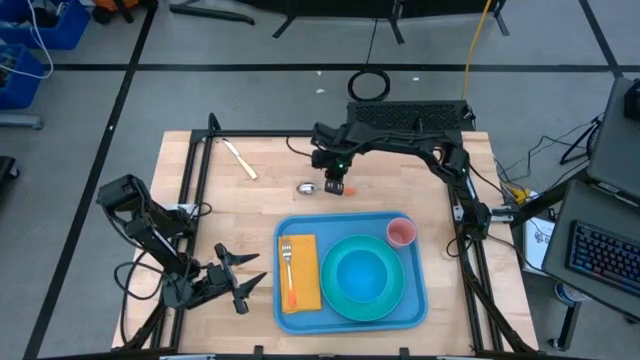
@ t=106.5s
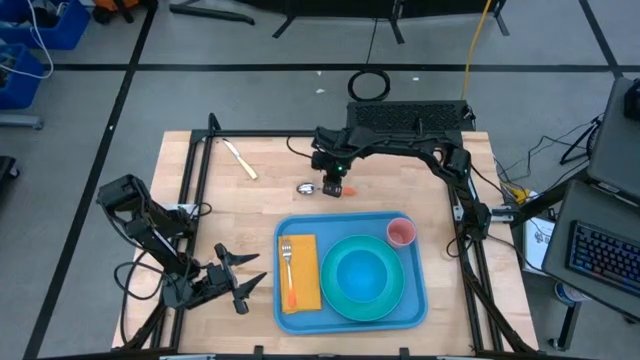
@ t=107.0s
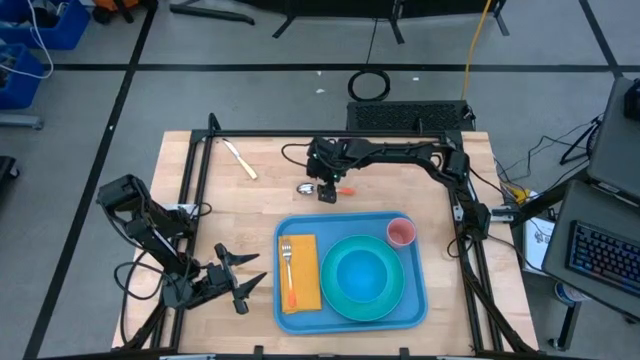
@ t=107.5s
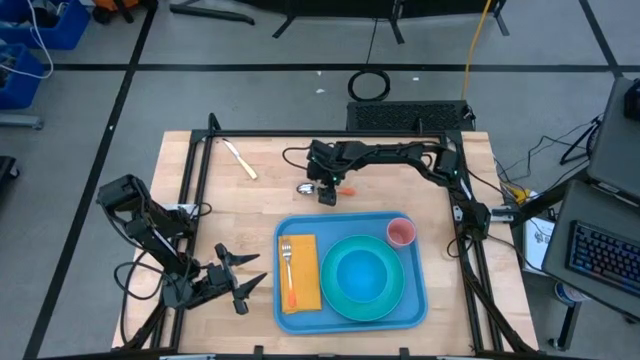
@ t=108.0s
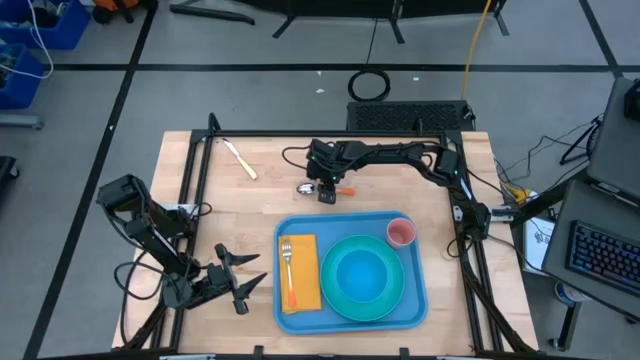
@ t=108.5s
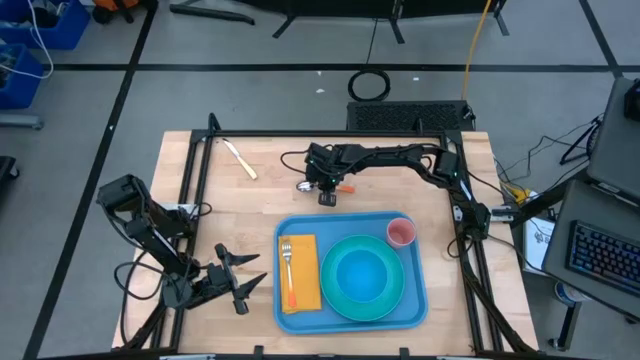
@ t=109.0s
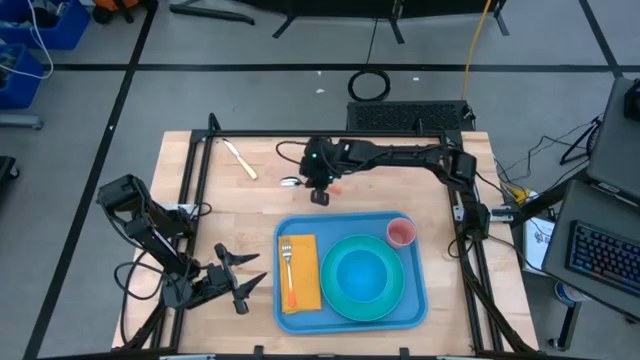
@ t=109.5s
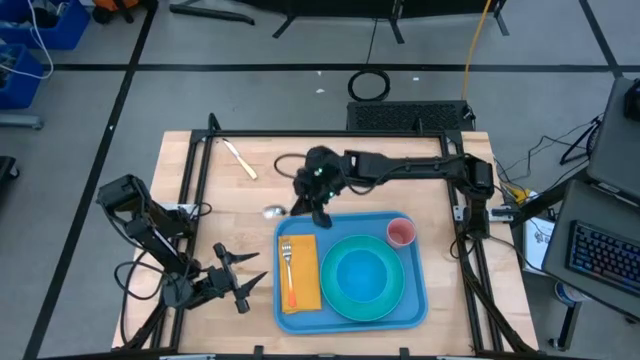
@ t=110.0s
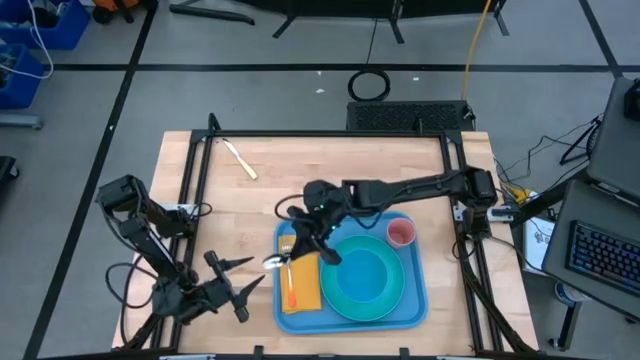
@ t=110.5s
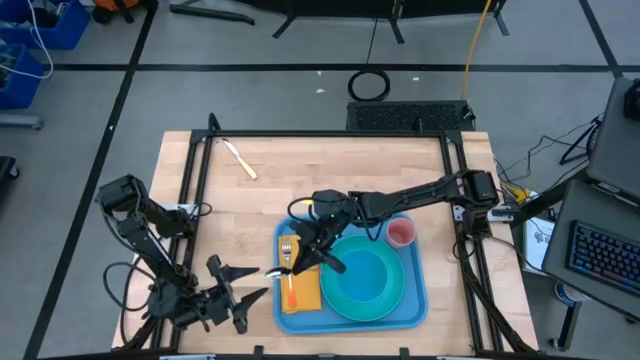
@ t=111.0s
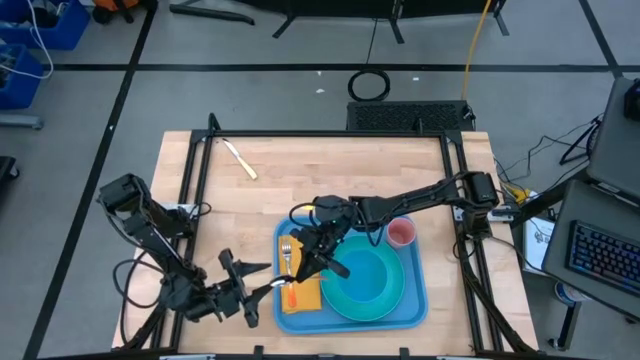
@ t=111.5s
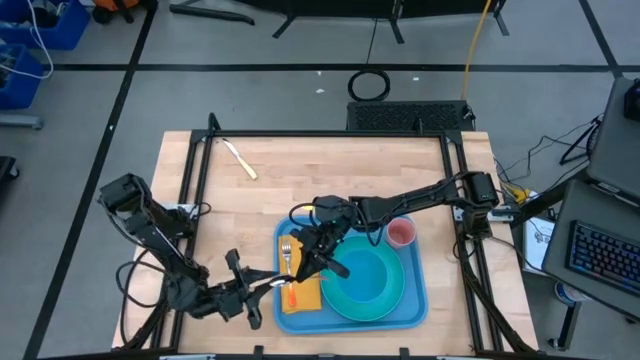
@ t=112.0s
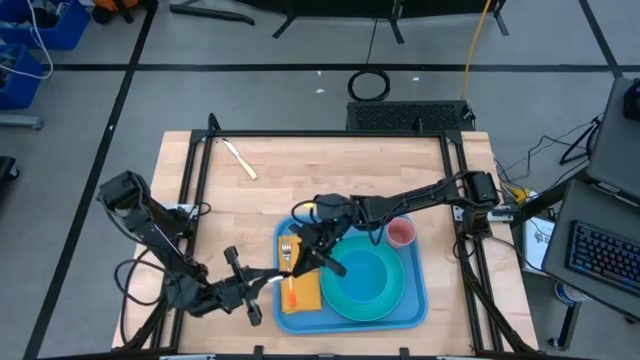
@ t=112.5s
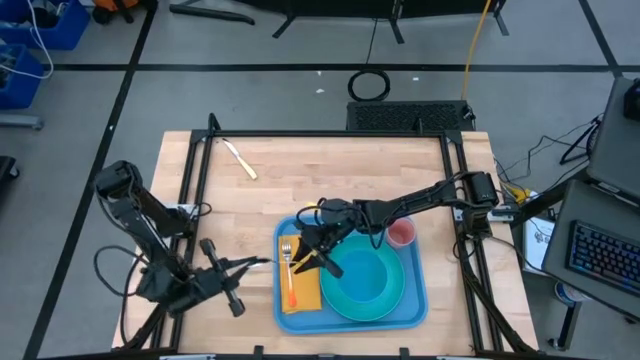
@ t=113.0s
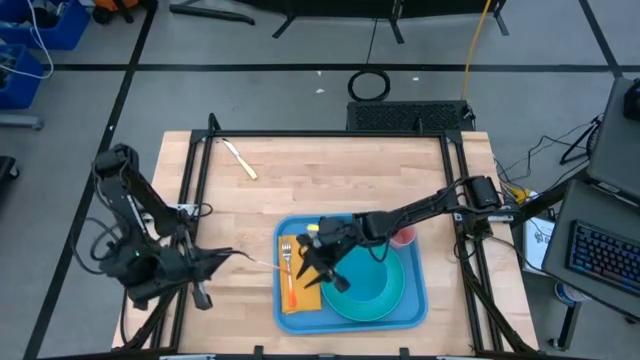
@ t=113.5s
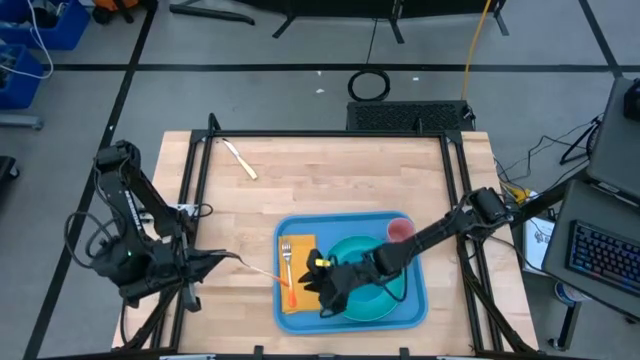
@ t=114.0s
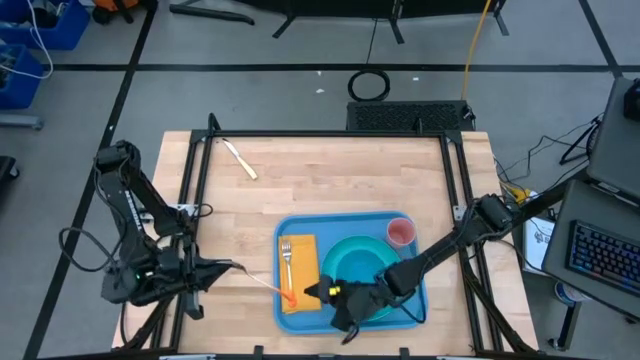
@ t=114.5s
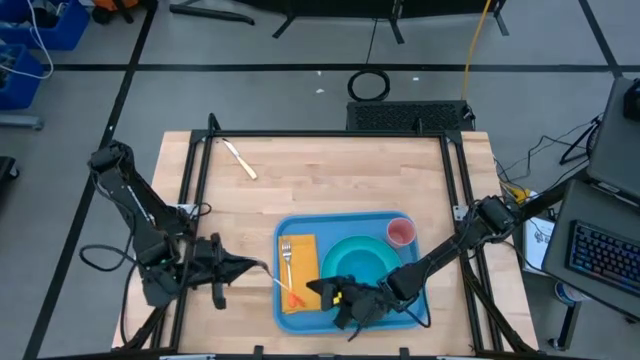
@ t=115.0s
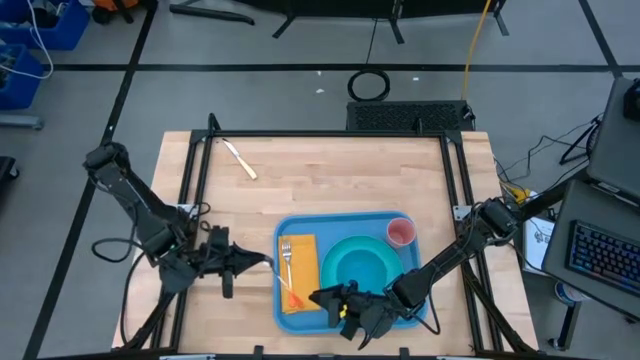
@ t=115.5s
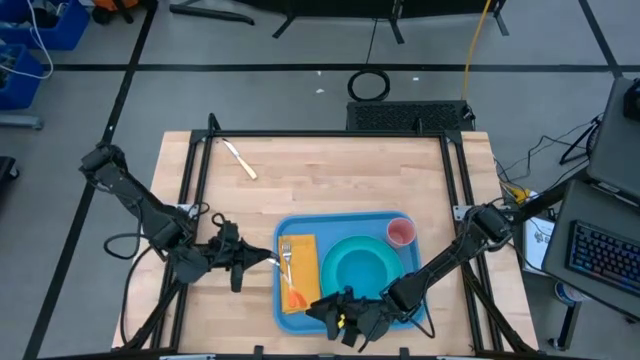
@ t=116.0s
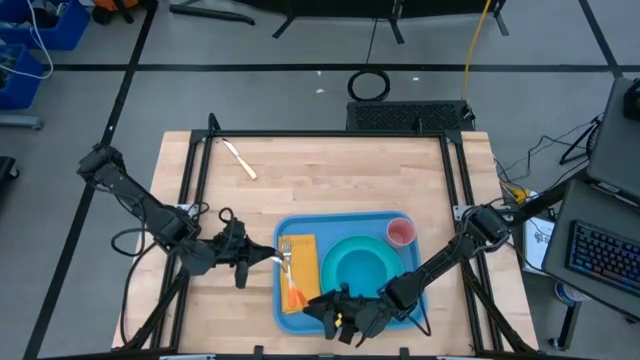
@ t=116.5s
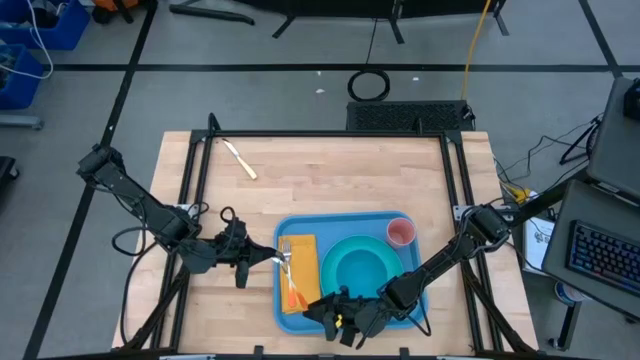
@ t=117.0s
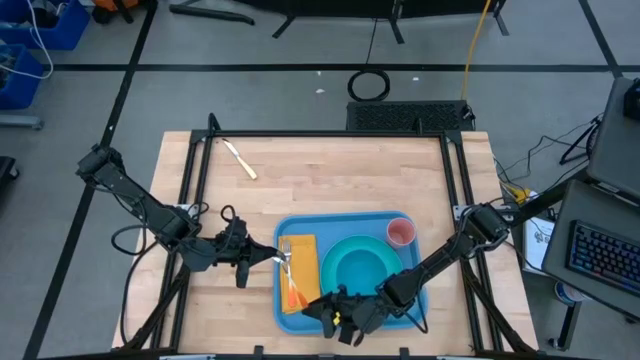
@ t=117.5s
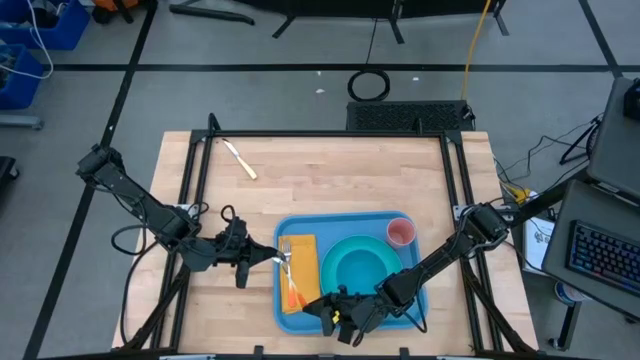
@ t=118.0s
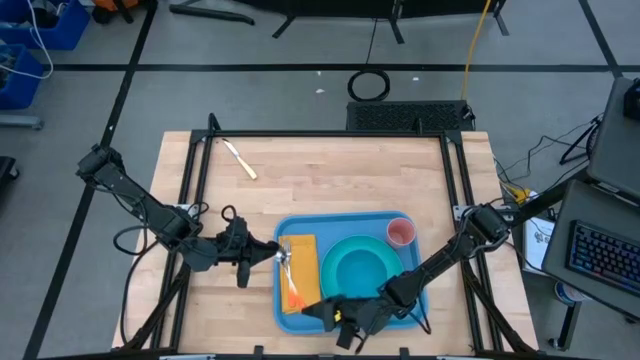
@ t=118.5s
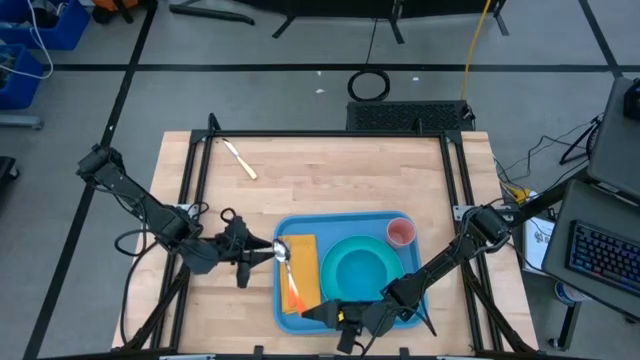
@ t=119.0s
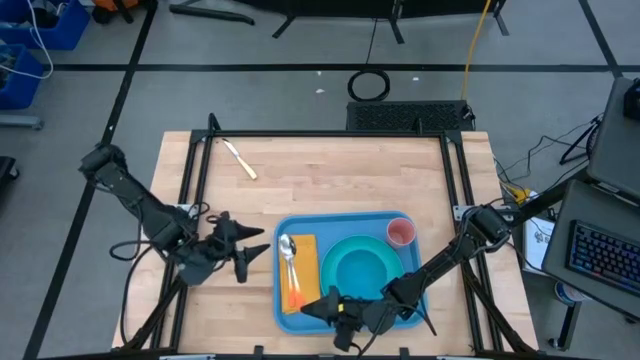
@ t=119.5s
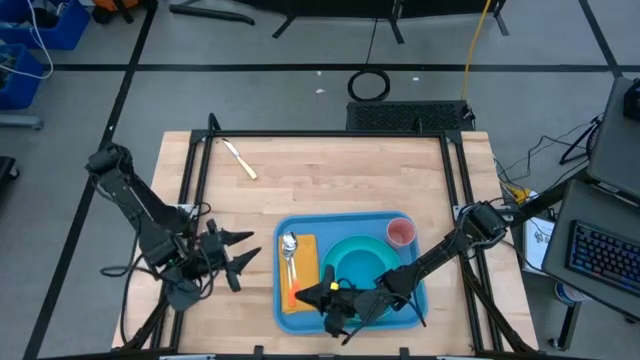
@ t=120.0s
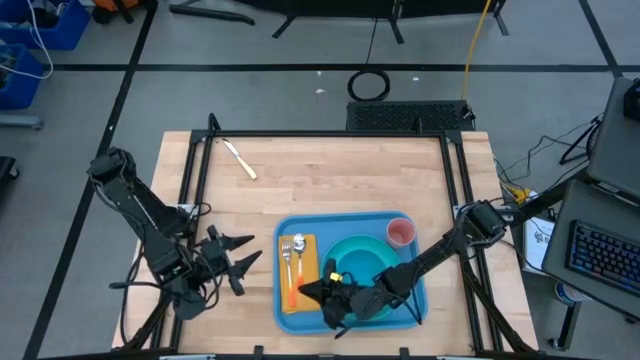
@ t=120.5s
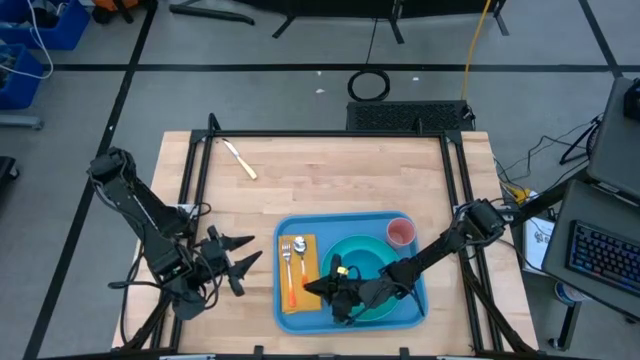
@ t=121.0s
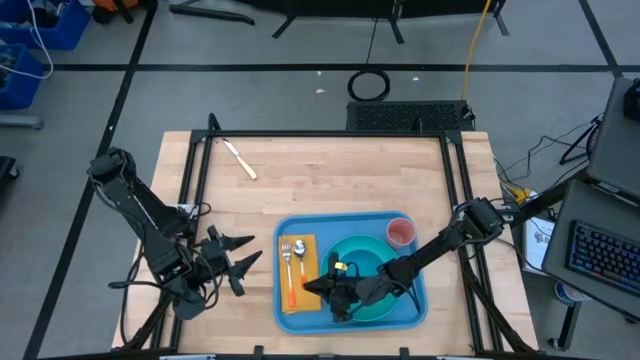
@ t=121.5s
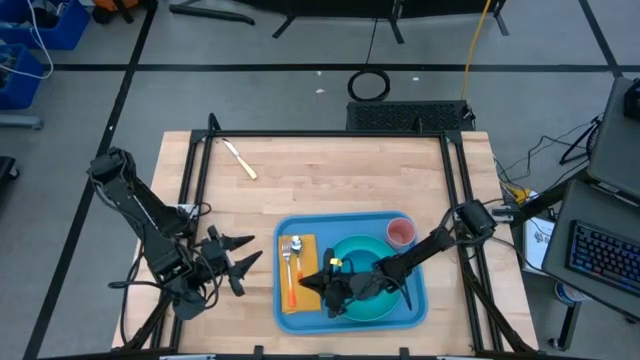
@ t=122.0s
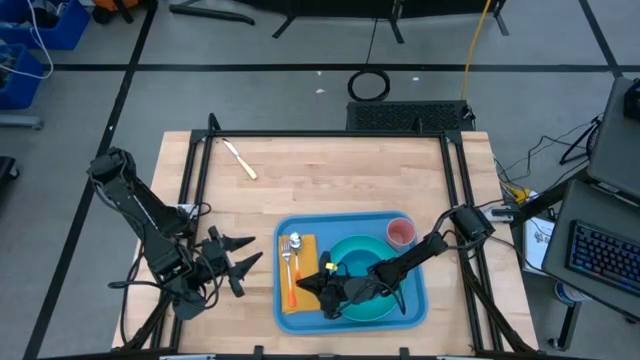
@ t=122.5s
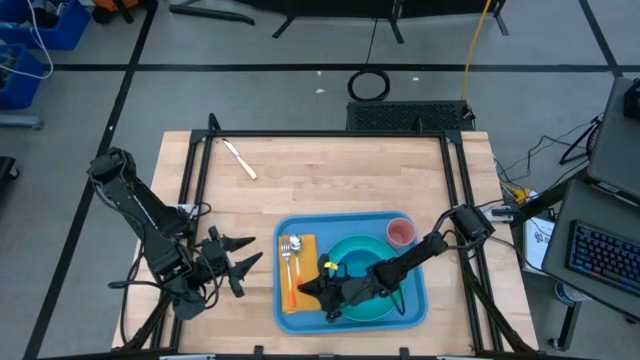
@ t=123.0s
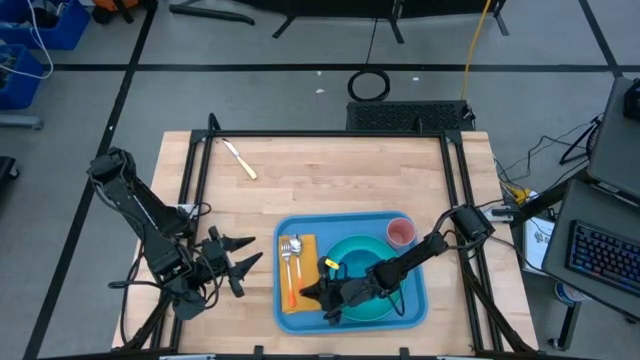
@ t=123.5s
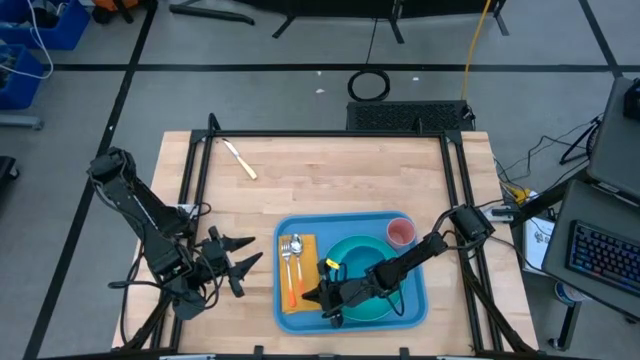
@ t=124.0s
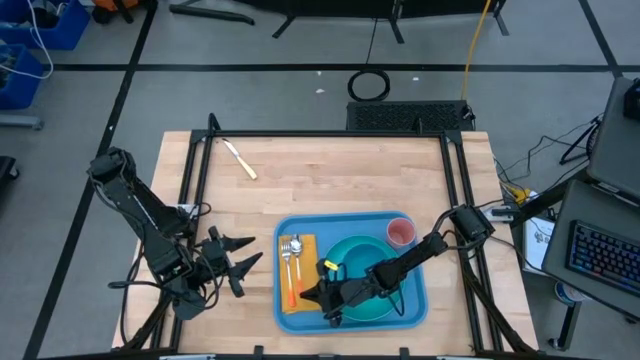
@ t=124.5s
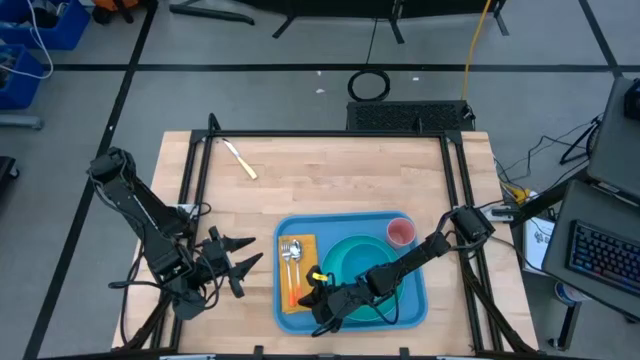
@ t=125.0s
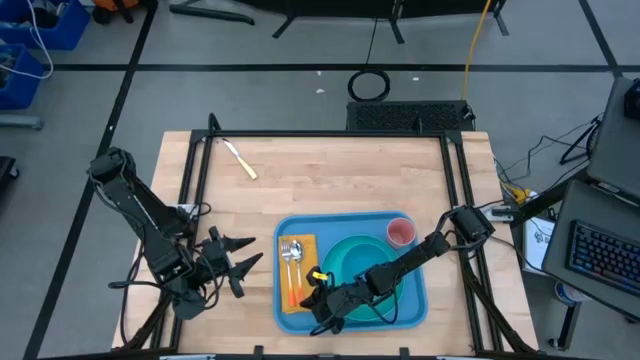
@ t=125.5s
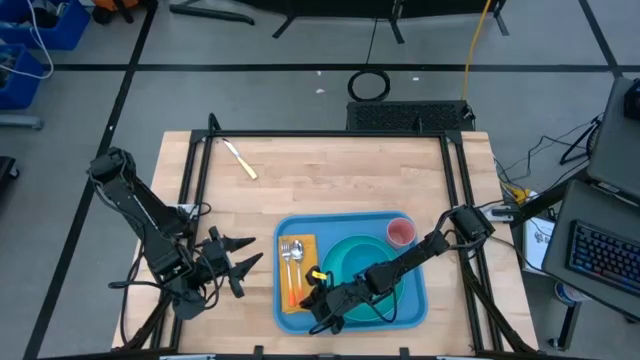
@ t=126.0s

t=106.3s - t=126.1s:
Task: Set up tray
Put the orange spoon on the yellow napkin to the right of the orange fork

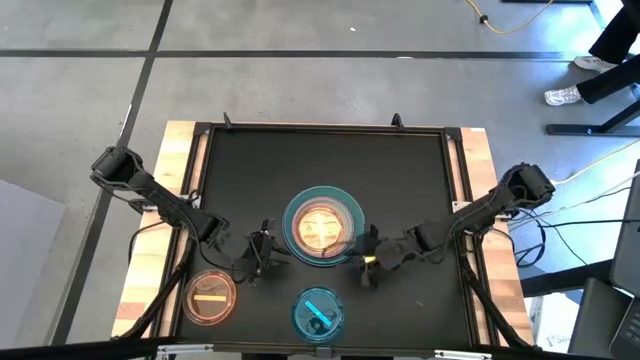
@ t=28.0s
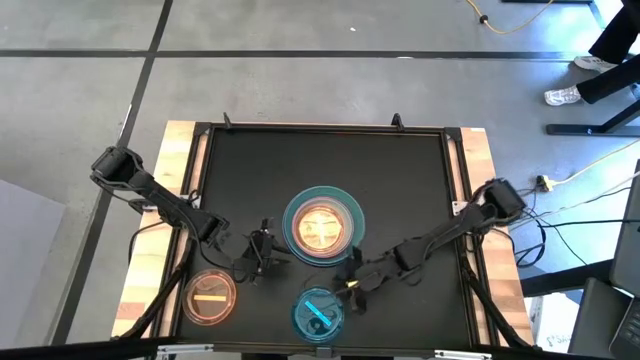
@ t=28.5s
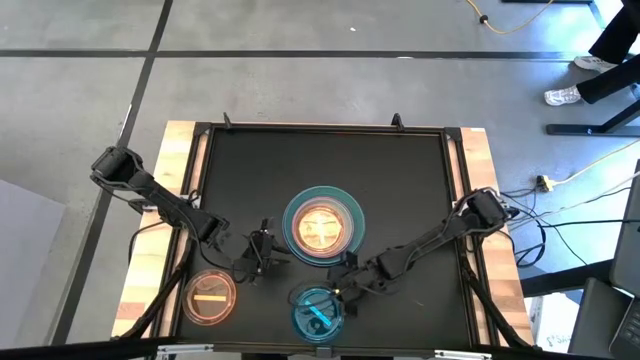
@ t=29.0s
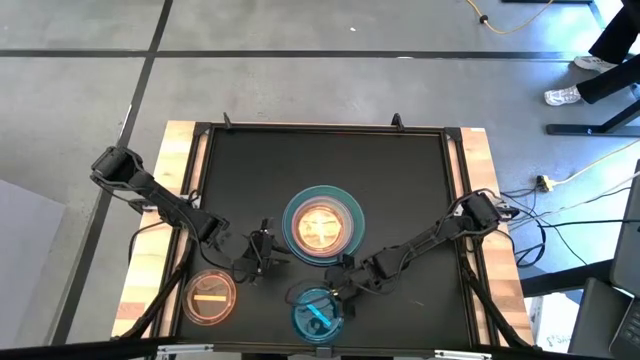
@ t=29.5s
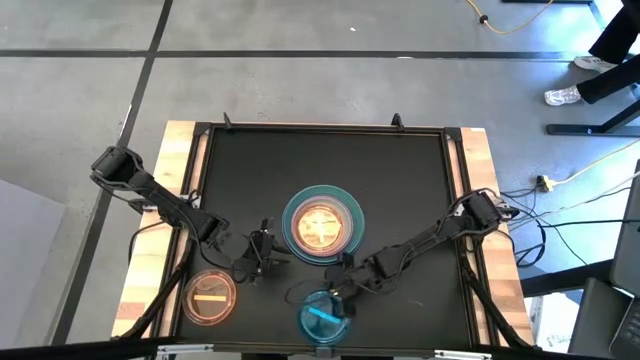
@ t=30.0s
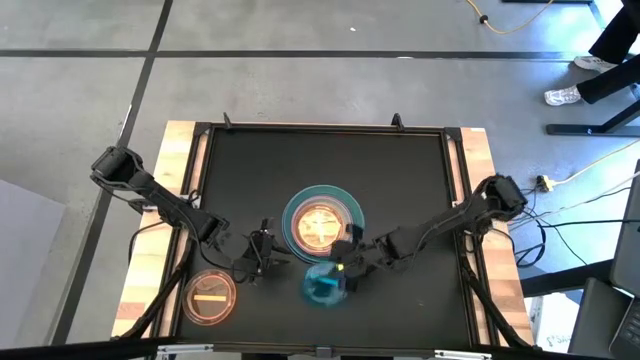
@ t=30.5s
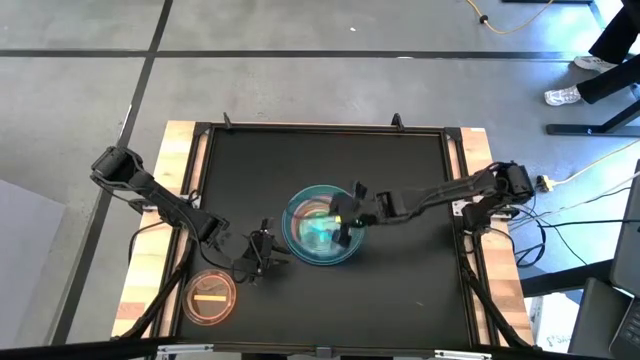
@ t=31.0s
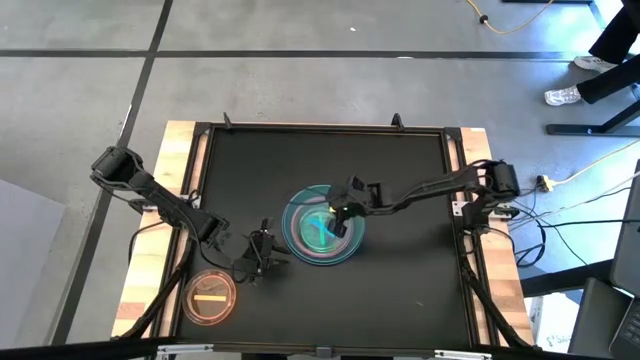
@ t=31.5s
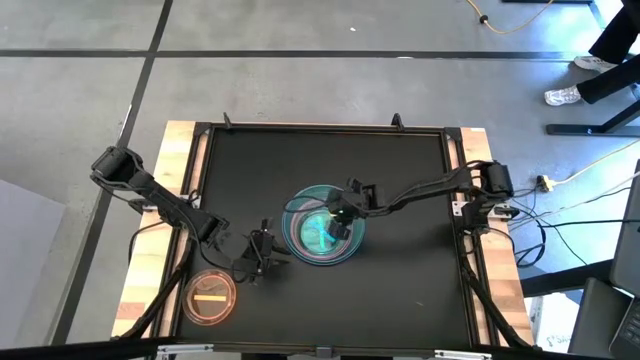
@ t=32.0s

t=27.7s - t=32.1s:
Task: Stack plastic plates
Stack the light blue plate on top of the light green plate
